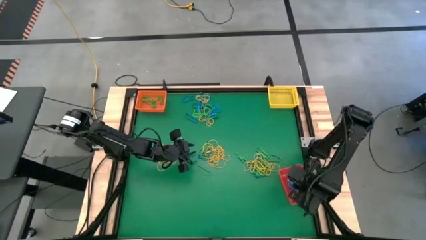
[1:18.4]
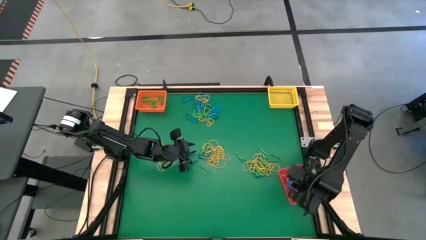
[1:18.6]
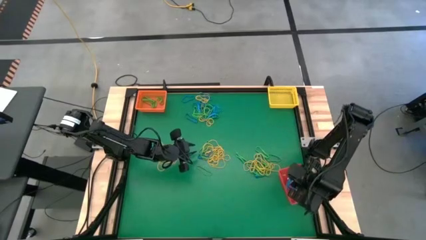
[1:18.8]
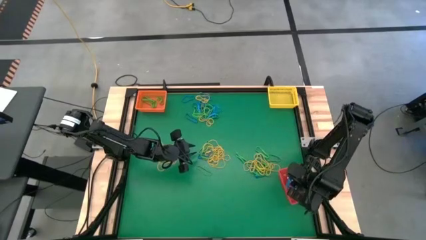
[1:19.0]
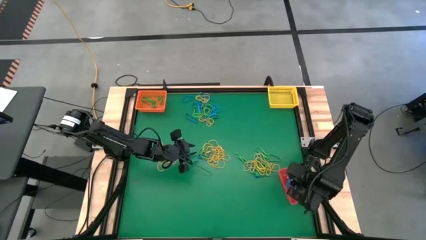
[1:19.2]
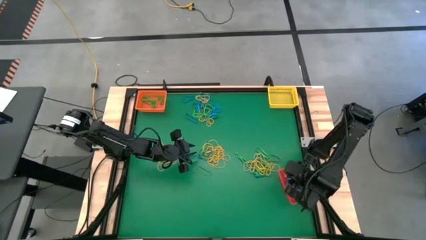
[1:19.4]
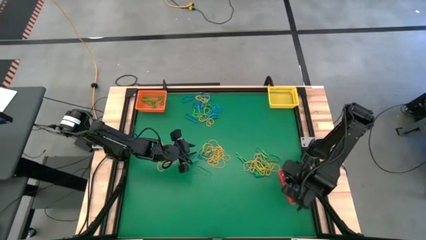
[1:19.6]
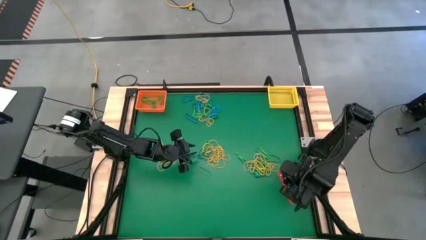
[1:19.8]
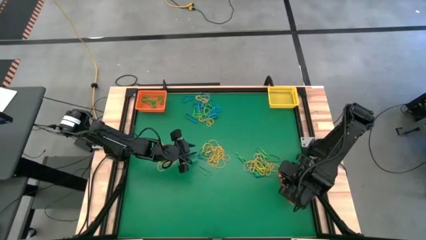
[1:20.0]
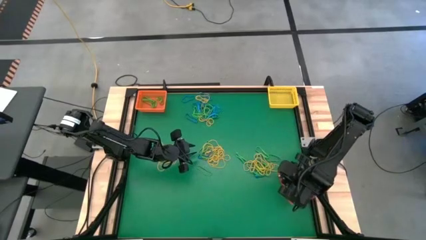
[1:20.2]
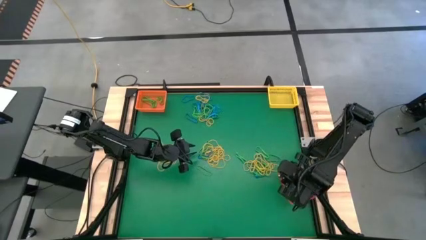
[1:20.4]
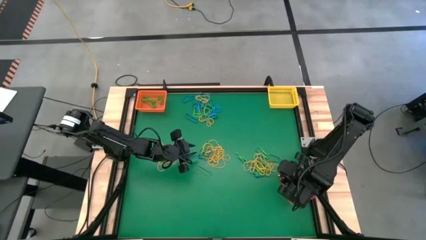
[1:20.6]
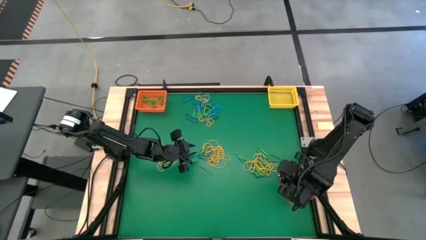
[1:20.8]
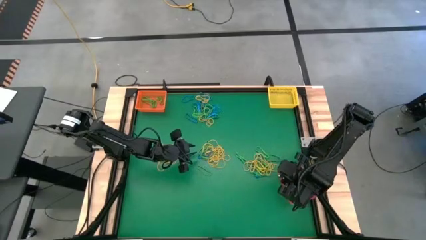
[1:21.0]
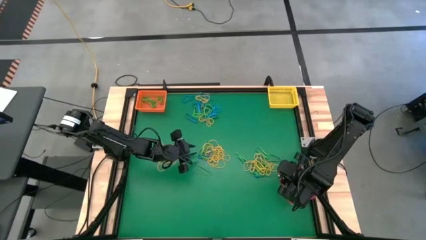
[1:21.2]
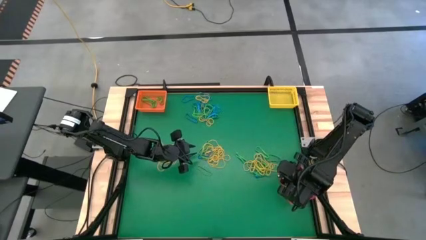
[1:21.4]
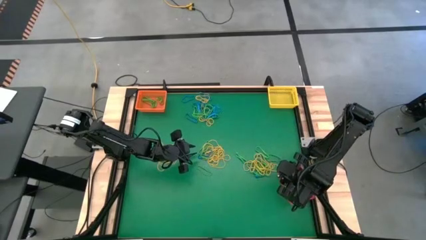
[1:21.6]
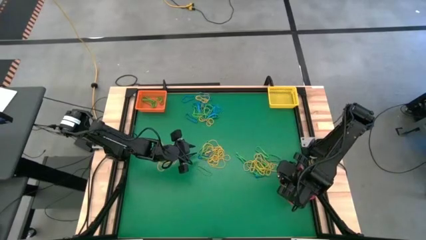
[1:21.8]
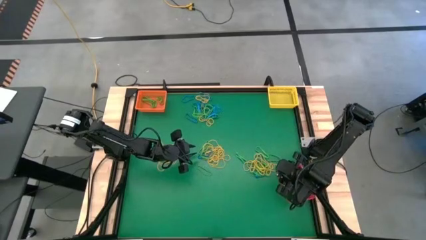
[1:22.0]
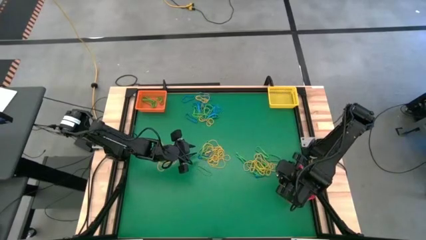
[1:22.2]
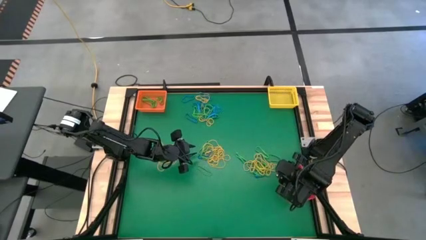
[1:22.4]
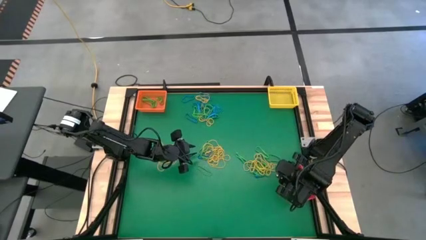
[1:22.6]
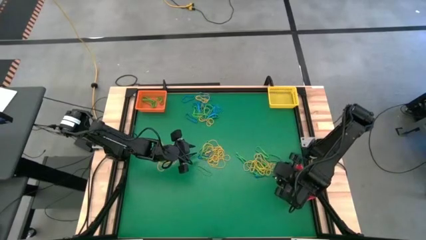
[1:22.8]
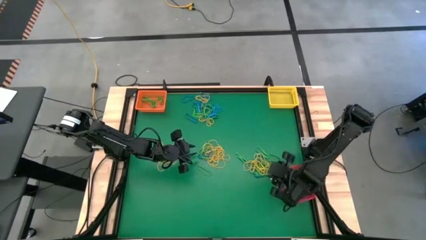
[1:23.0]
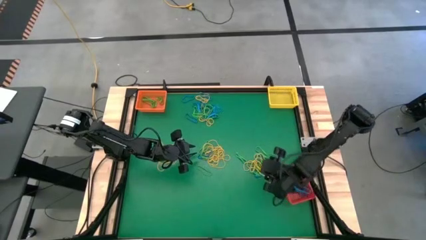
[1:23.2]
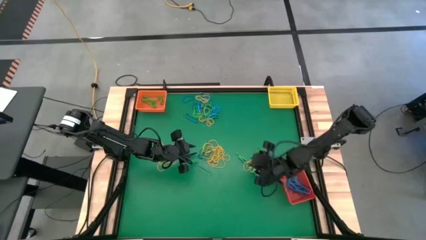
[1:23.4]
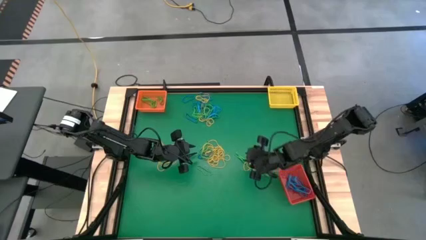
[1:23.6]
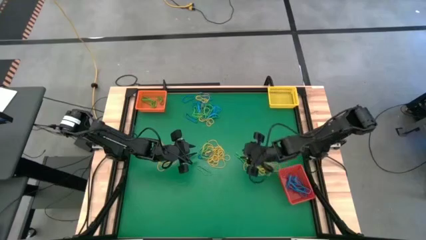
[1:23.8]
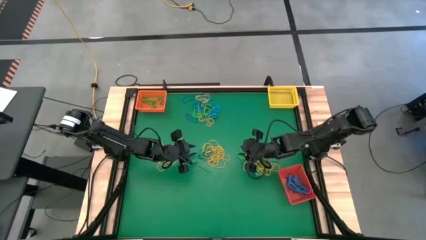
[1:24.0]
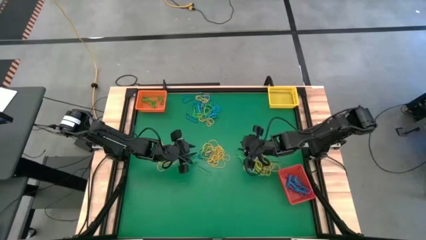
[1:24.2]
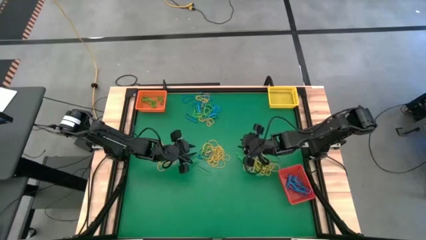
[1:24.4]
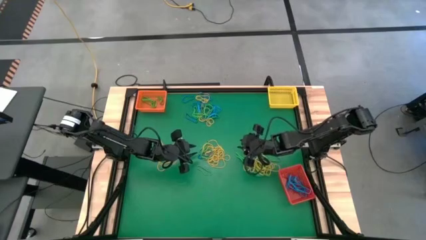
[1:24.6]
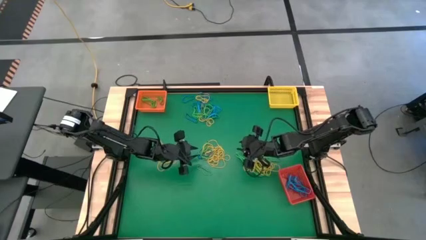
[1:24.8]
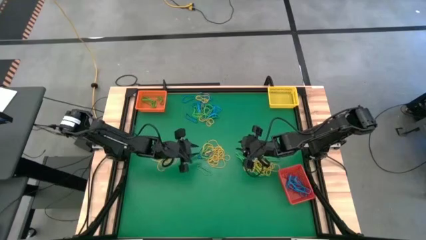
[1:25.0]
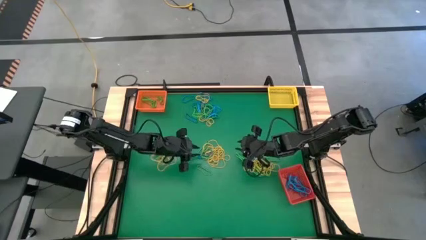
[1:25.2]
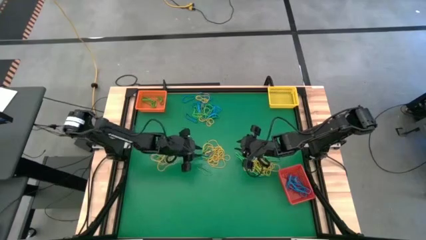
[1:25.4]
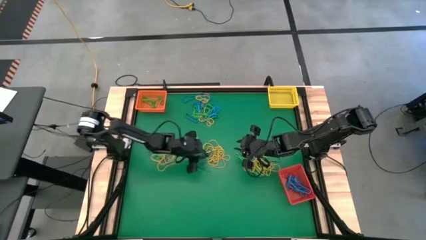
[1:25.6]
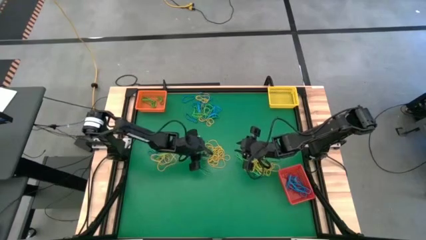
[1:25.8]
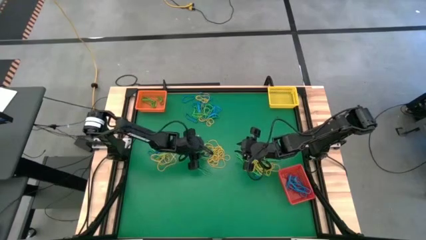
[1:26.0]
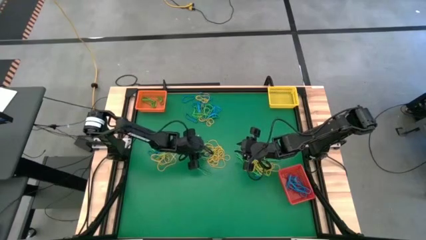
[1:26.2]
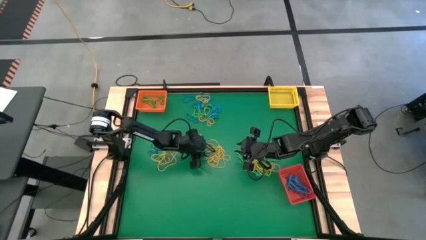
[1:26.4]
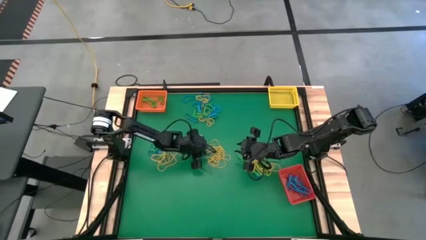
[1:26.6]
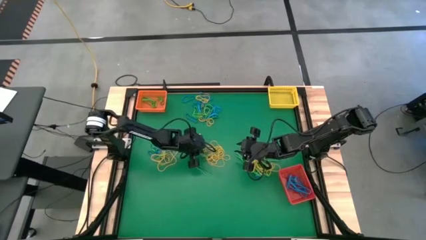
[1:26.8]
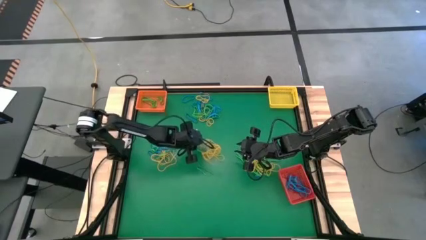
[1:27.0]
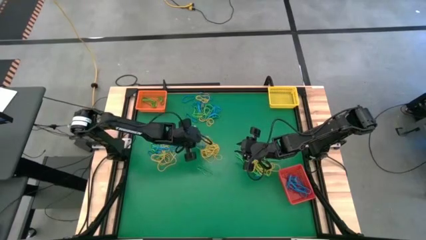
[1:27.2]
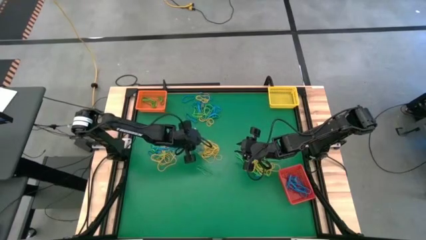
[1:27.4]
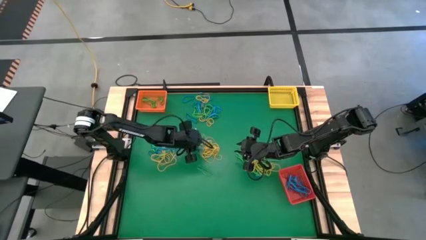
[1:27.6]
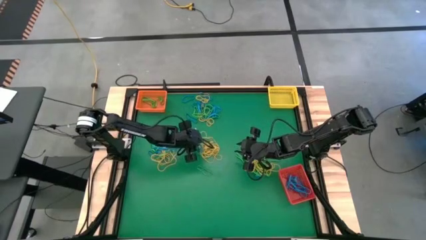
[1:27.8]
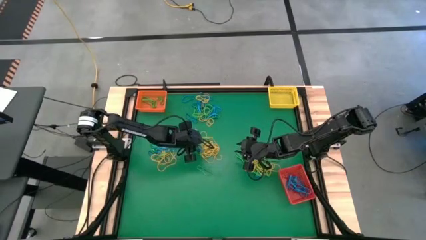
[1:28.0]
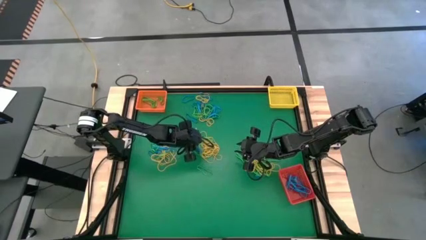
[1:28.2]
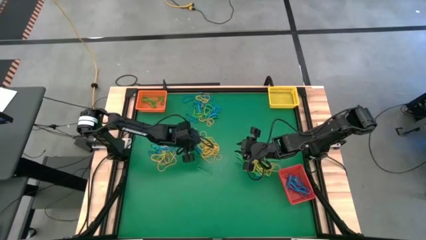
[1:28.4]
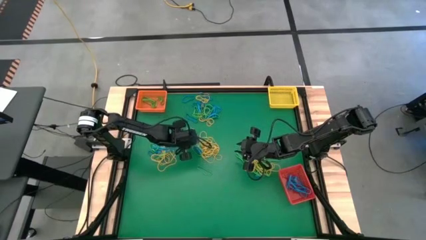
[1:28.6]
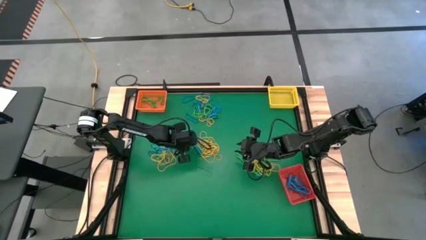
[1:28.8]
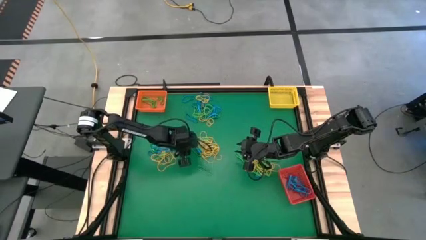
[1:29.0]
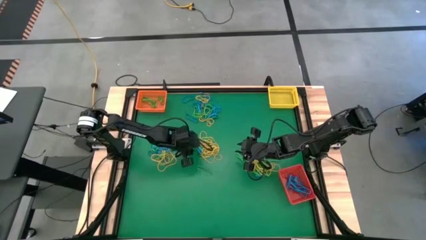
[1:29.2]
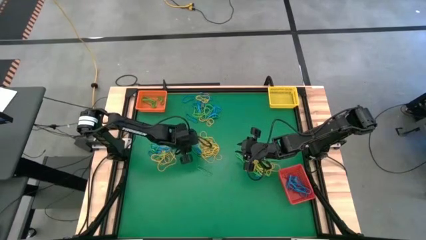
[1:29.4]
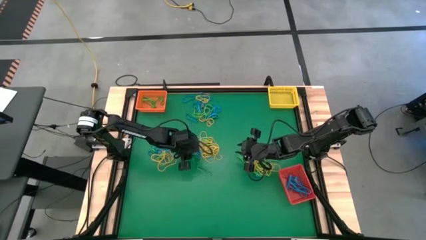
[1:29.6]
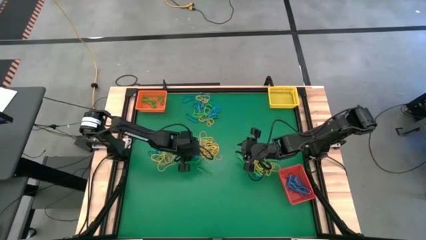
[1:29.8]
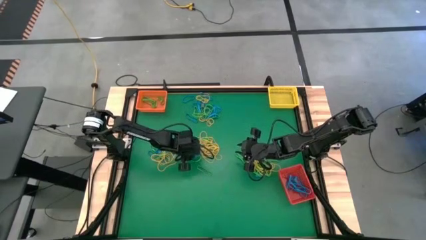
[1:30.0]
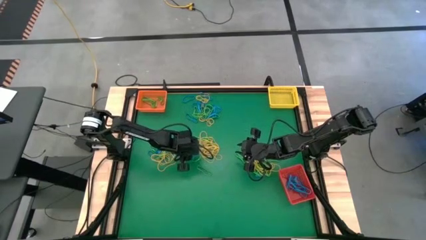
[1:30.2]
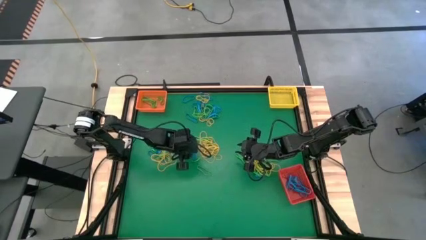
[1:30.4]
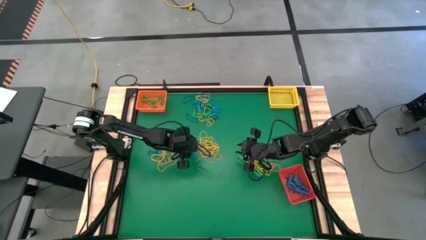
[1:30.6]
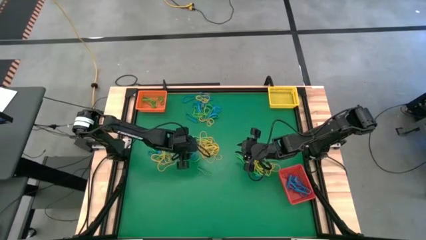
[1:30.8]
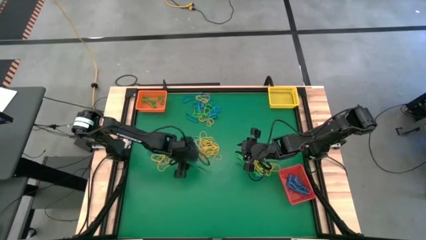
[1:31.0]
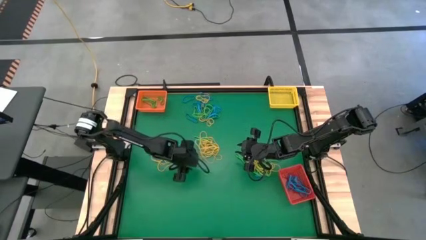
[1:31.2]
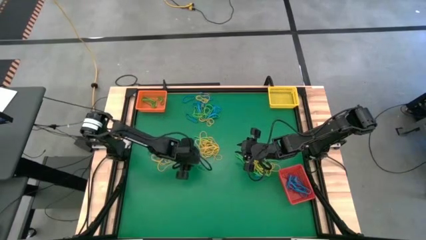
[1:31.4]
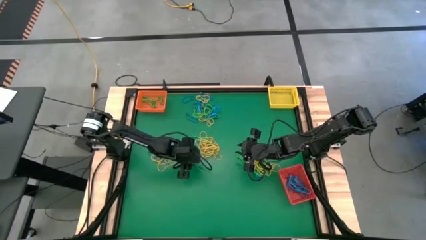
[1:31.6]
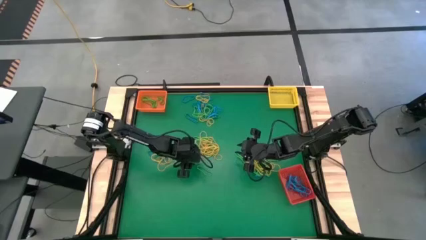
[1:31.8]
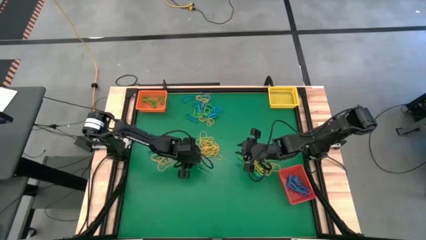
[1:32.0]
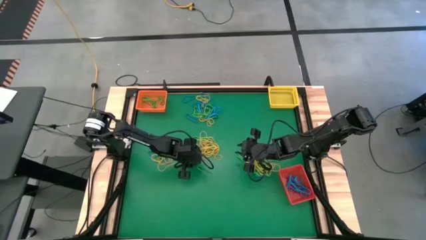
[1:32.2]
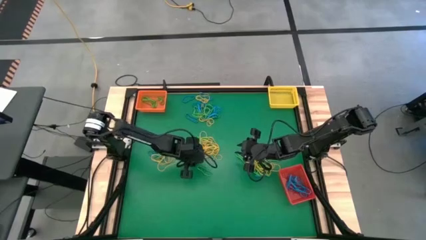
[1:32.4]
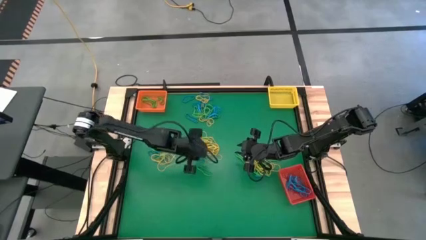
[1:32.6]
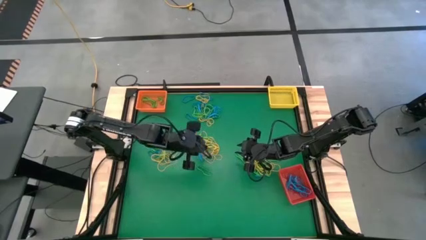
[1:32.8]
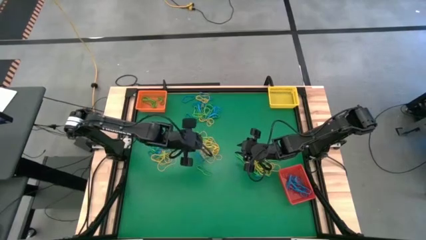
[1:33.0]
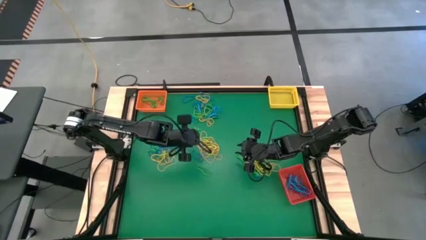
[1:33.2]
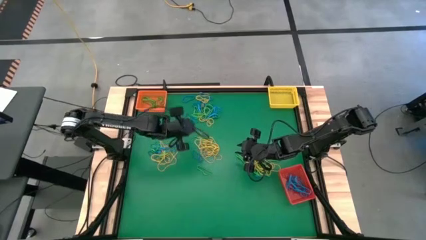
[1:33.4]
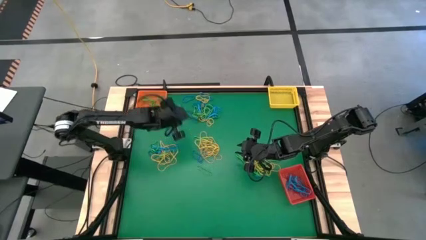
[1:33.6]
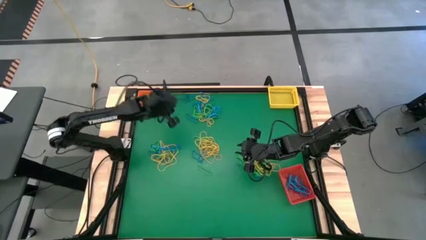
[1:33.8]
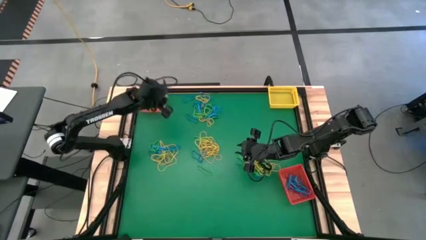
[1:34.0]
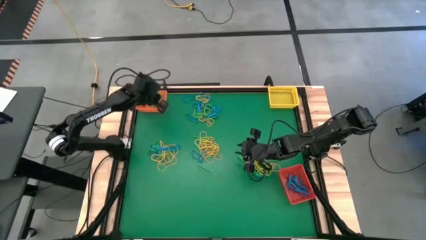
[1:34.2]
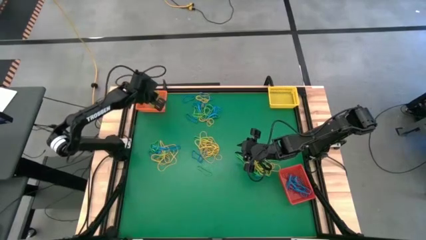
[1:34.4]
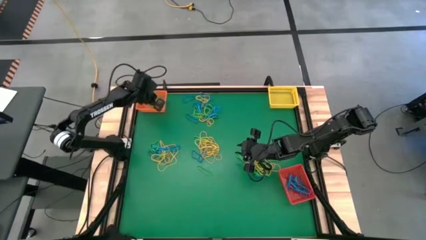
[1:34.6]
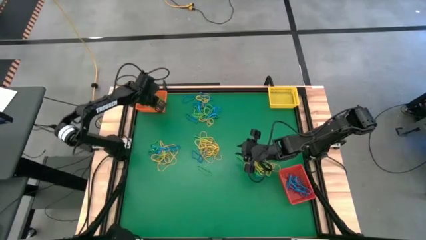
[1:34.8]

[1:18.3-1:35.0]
Task: Sort rubber bands into baskets
Put the green rubber band into the orange bin
